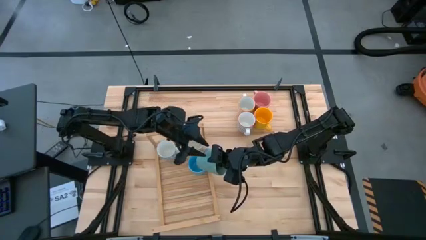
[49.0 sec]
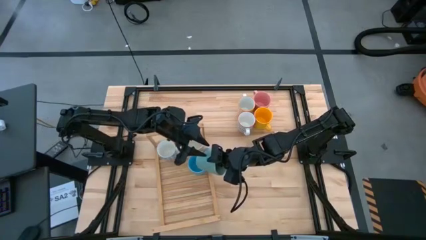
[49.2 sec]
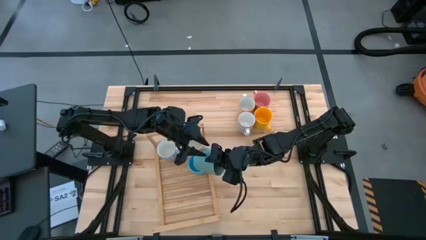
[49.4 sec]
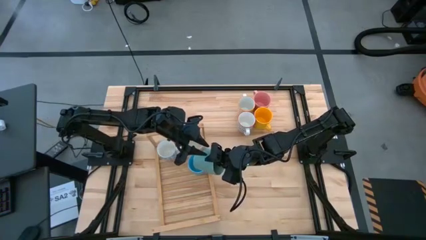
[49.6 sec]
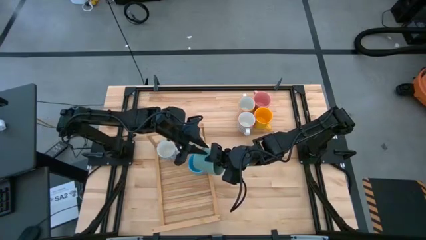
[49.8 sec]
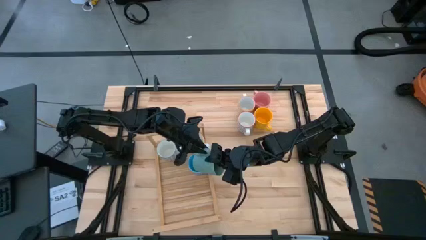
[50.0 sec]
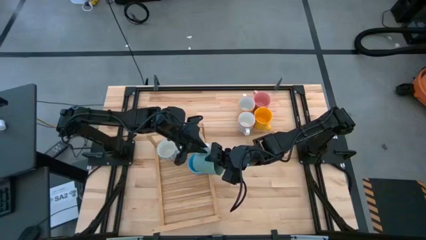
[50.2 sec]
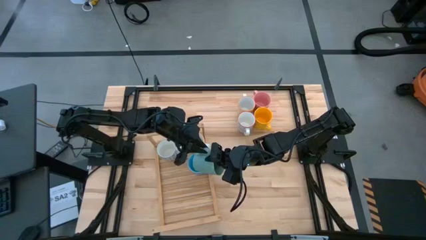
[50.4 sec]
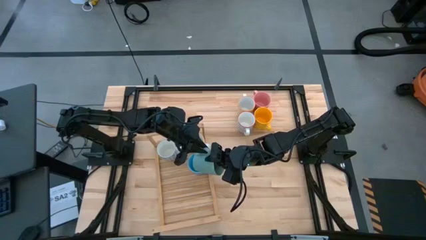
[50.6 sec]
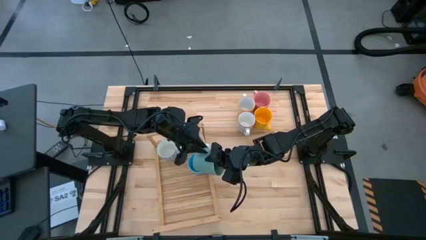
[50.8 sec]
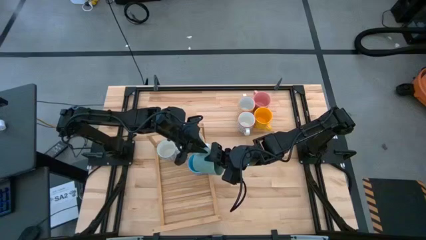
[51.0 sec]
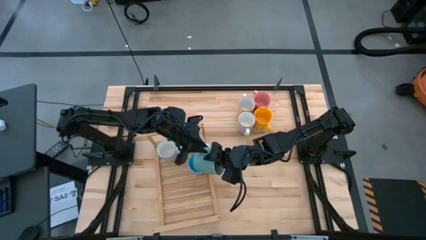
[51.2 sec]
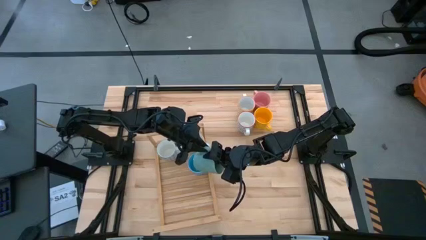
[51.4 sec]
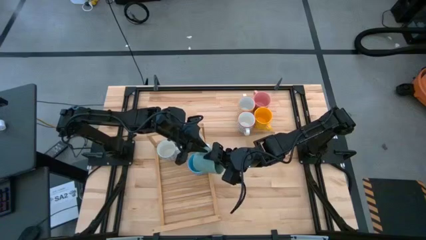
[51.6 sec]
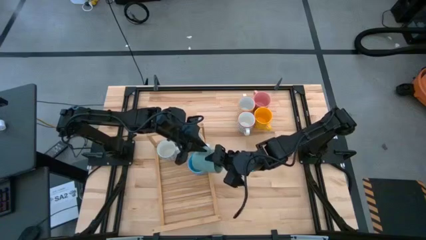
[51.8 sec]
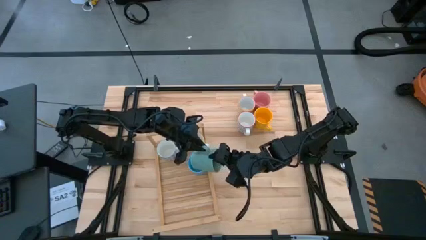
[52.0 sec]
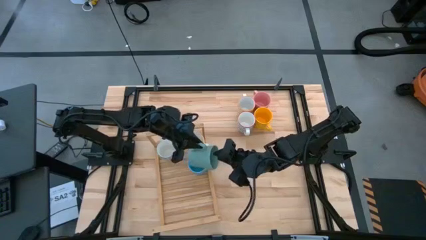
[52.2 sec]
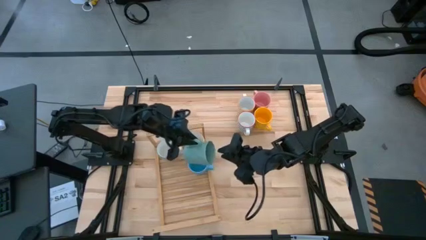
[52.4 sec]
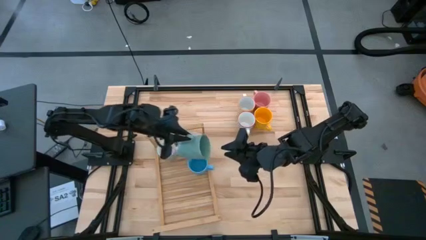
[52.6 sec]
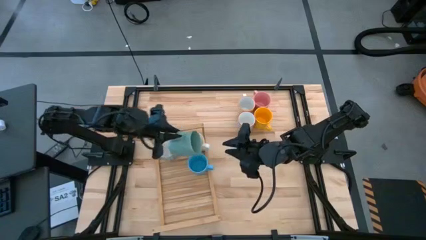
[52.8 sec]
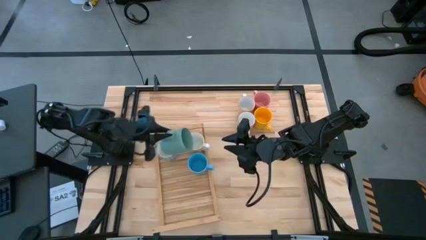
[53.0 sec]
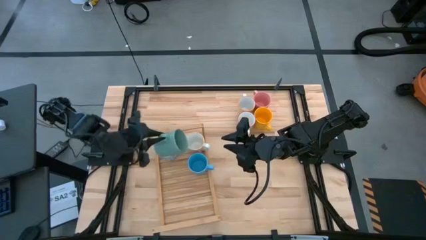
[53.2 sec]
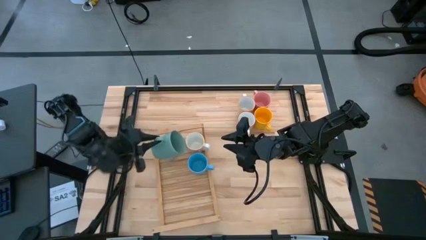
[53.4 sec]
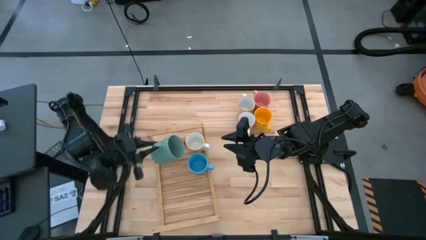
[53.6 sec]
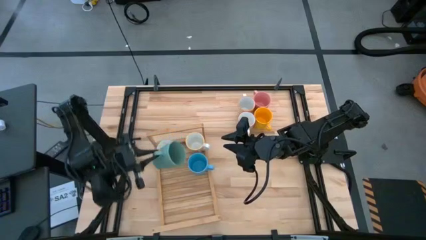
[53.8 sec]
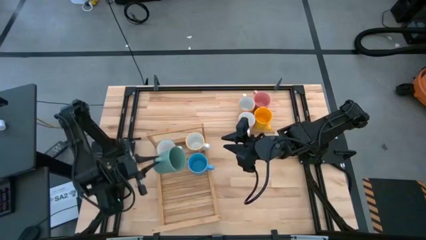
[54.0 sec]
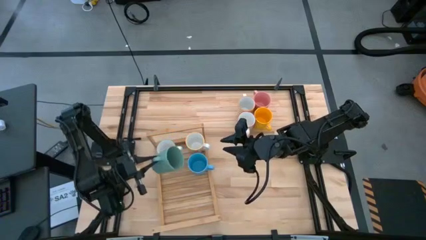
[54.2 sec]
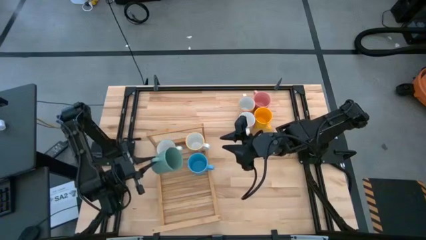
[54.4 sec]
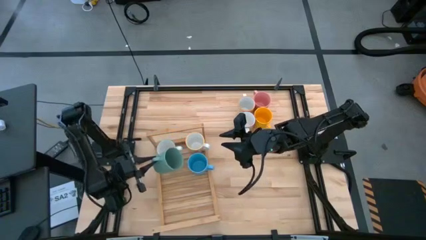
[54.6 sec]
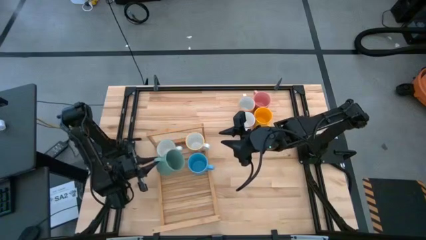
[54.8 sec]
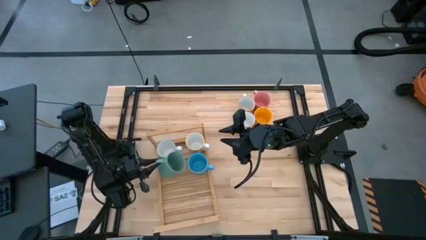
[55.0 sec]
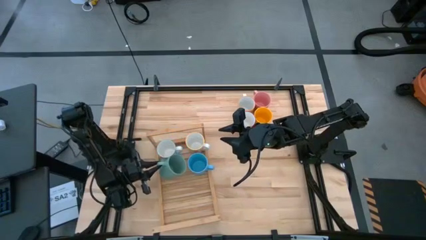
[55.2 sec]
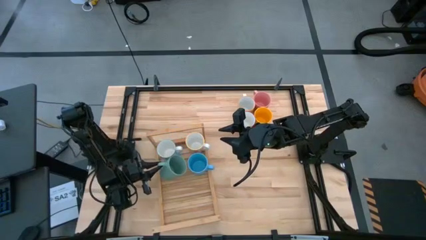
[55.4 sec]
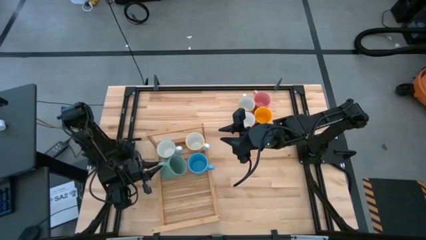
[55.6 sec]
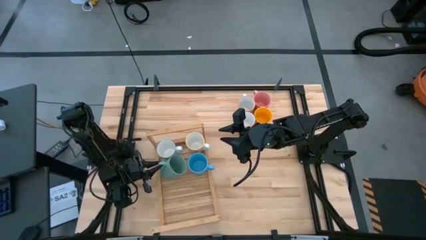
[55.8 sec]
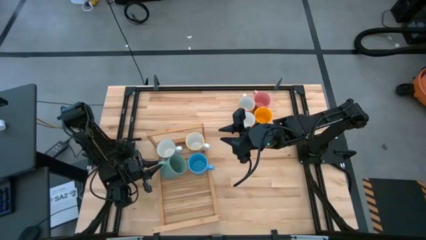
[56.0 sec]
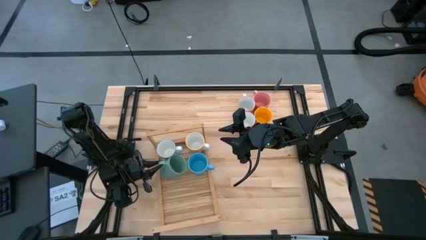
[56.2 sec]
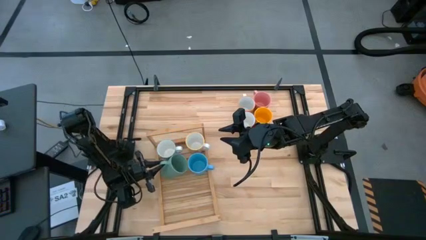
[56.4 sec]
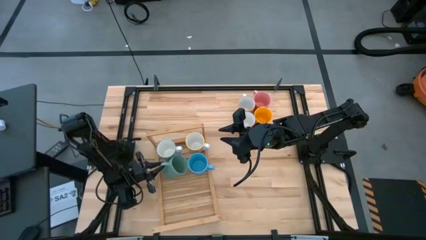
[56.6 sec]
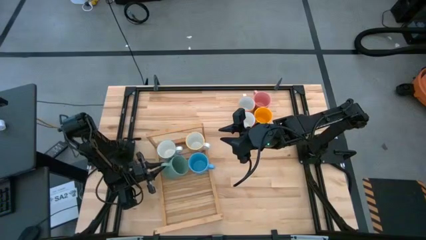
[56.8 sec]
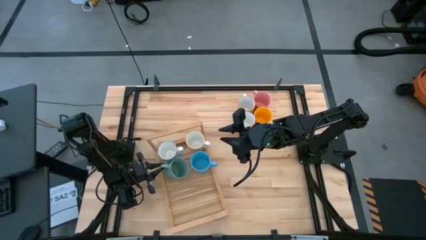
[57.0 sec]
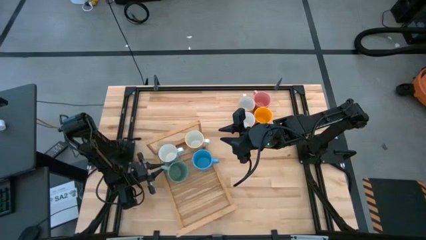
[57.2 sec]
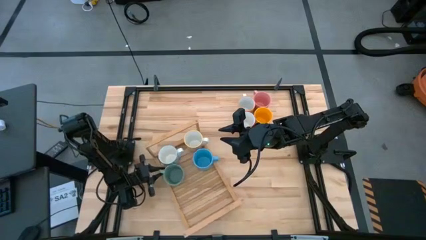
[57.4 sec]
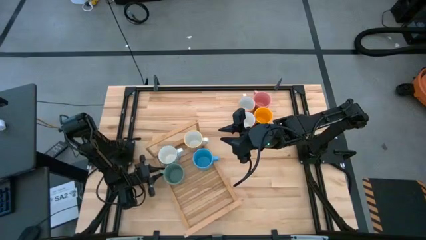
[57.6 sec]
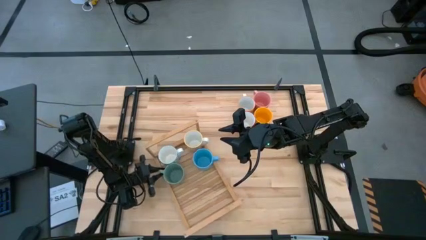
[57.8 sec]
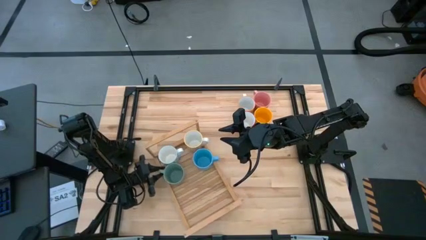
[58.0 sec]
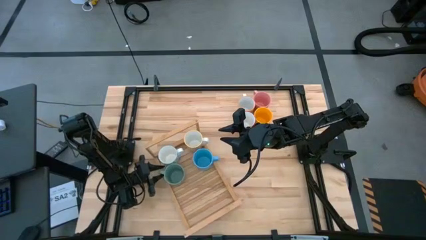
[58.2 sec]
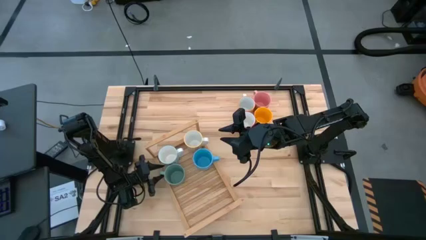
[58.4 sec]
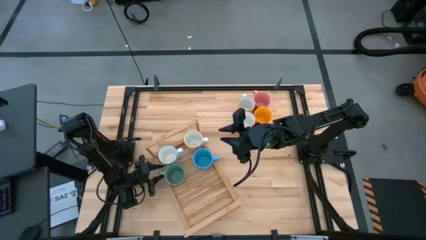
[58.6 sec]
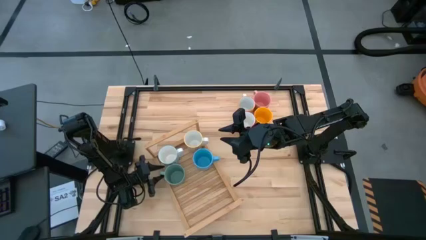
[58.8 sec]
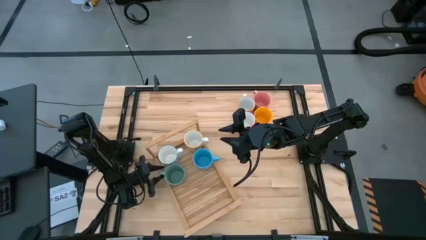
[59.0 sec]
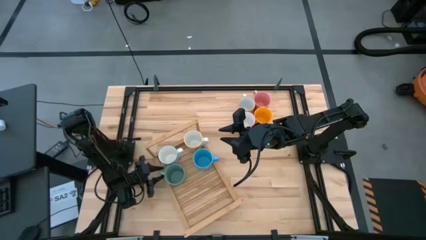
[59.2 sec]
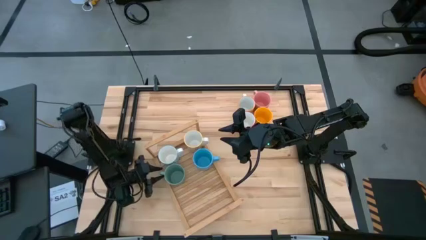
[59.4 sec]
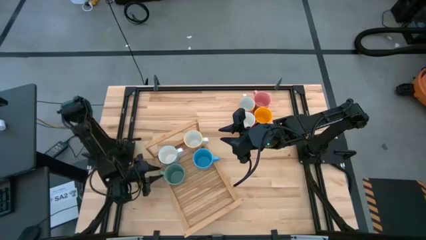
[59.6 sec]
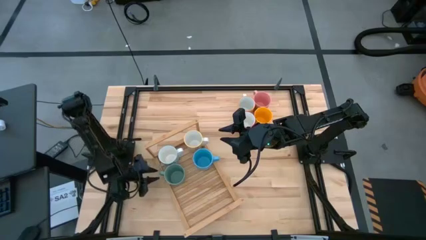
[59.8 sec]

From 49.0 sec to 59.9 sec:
Task: Place coffee mugs
Put the green mug on the shelf aligned with the light blue mug

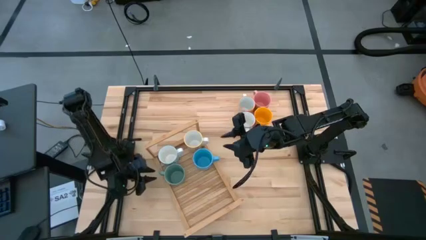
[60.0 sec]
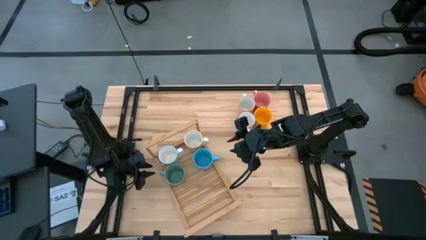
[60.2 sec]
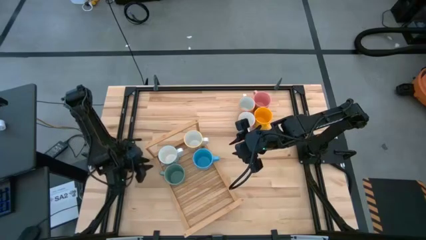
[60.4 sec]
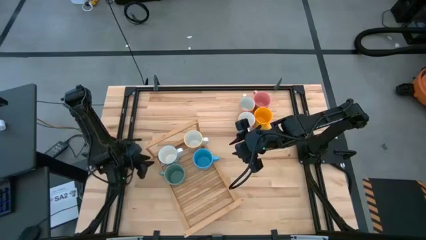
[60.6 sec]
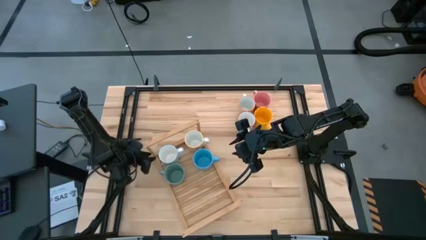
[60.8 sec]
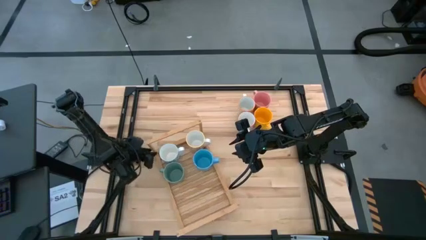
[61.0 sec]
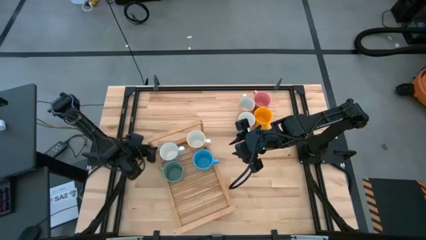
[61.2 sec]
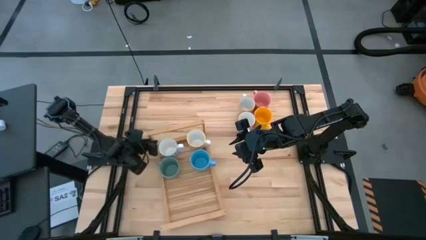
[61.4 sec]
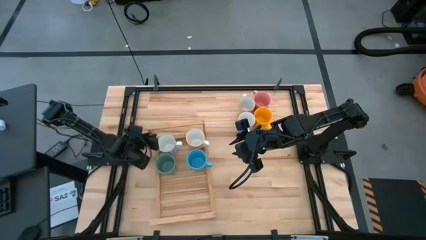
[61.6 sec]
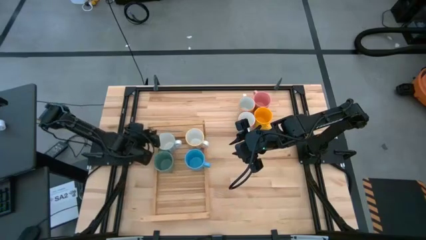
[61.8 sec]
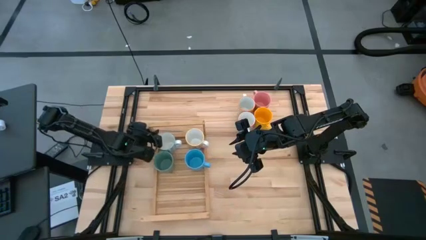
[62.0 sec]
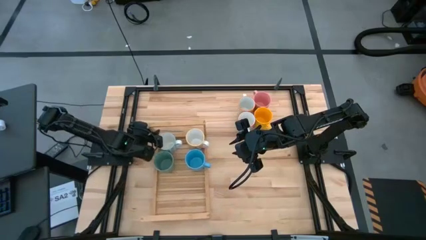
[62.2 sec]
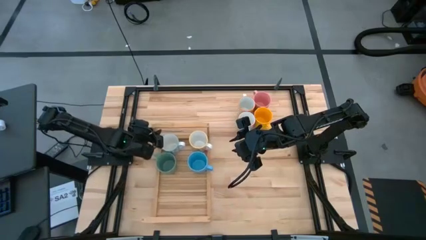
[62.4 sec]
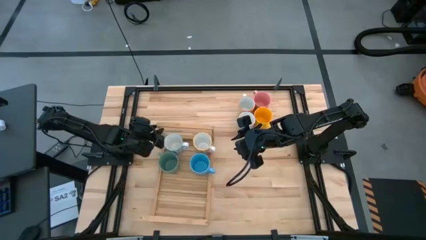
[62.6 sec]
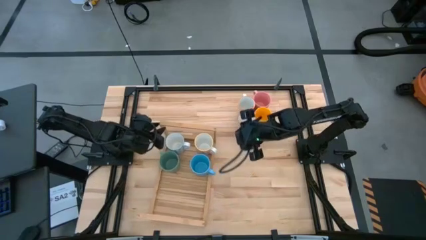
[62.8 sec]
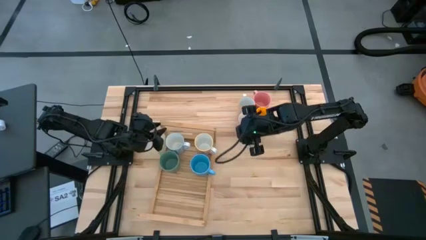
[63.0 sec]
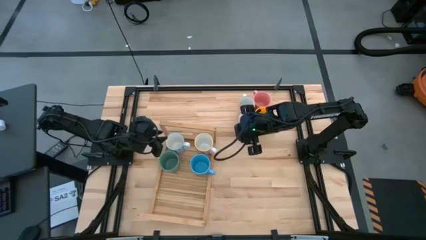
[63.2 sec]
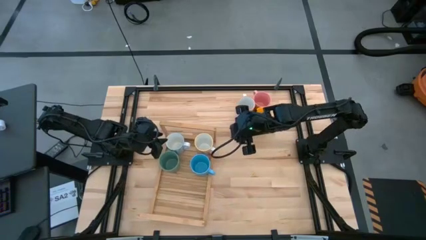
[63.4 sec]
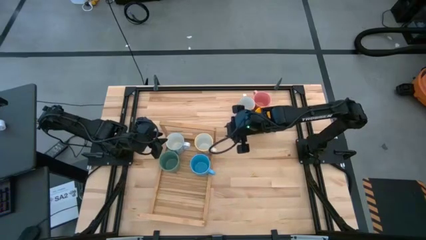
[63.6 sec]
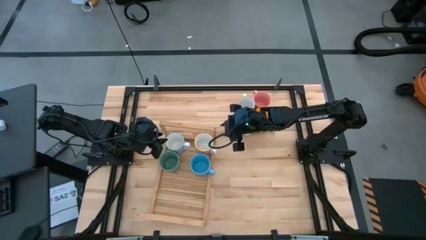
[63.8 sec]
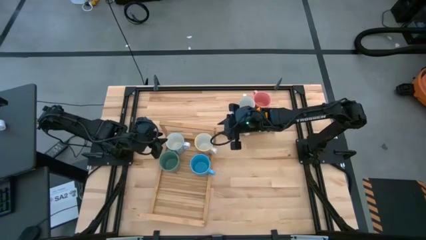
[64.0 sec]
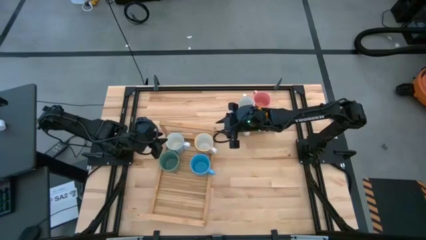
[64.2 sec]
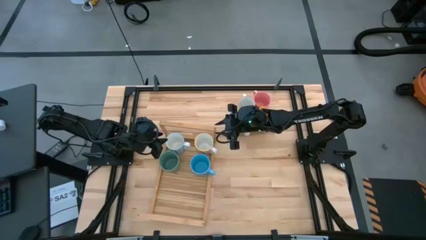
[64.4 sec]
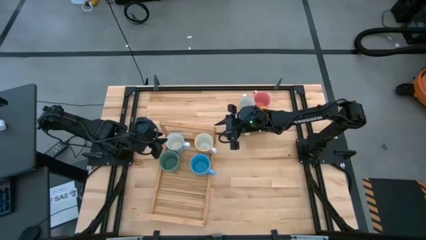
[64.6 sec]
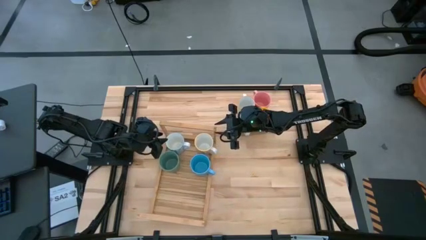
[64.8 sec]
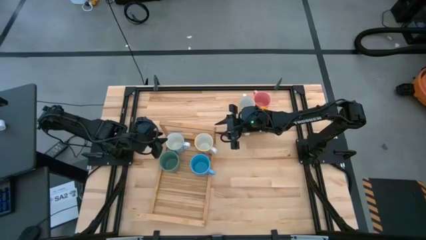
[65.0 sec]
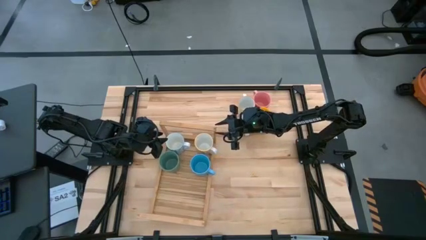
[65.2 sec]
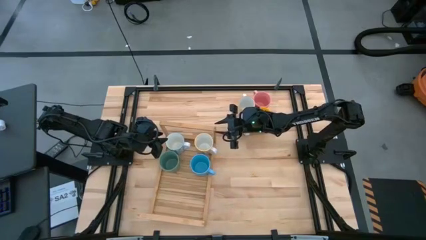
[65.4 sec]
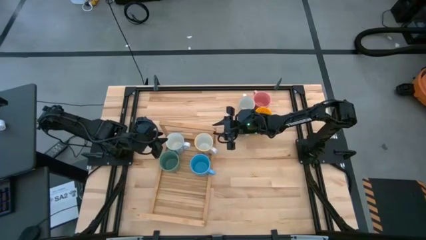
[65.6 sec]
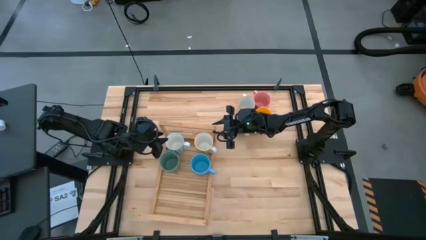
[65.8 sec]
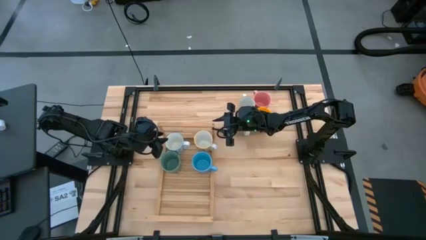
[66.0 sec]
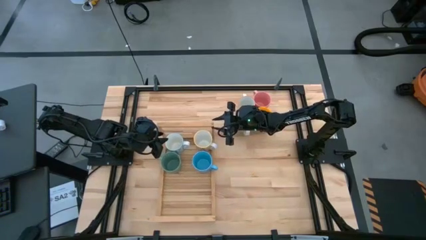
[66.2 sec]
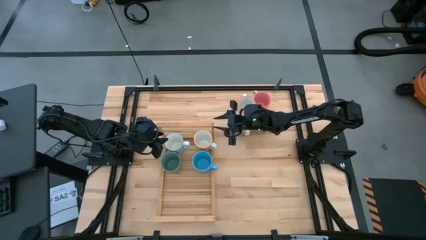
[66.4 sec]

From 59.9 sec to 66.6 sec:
Adjust the shelf
